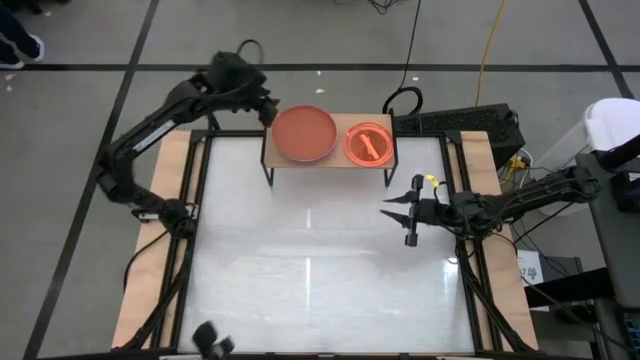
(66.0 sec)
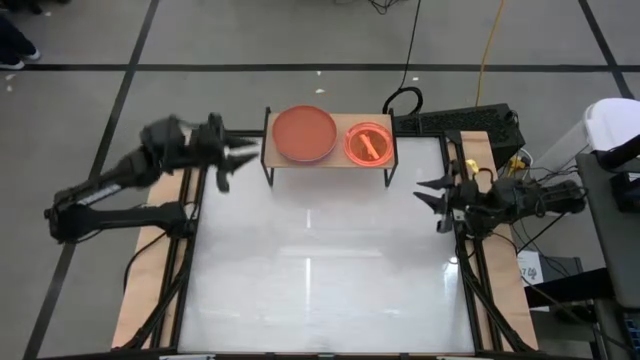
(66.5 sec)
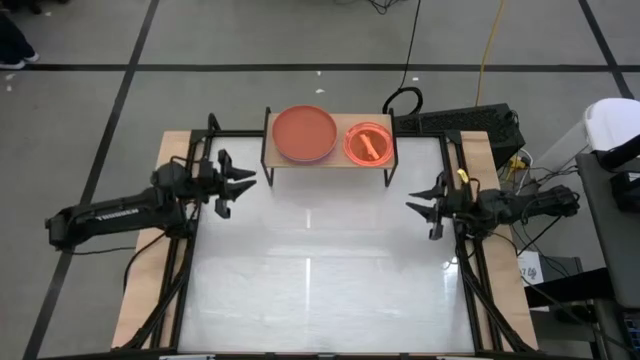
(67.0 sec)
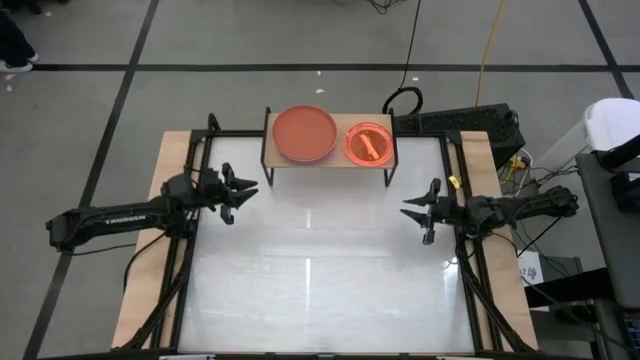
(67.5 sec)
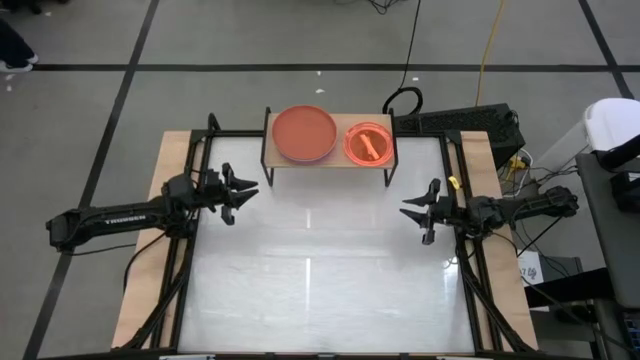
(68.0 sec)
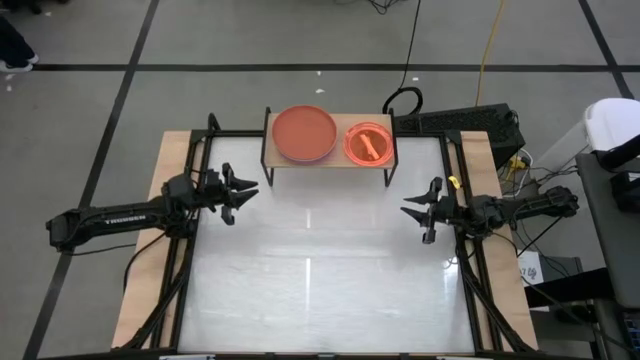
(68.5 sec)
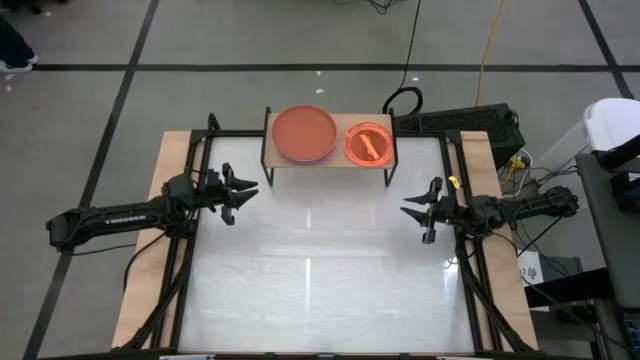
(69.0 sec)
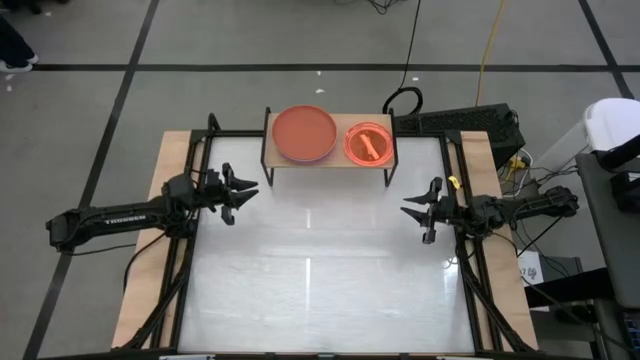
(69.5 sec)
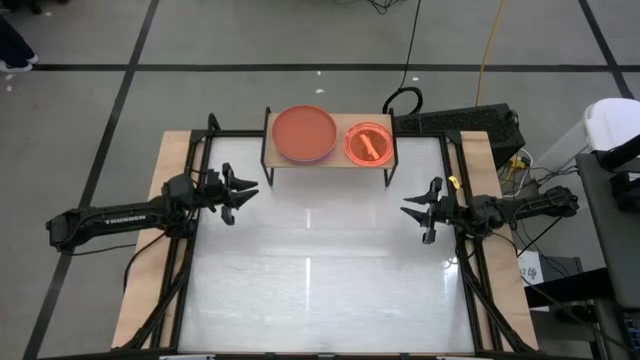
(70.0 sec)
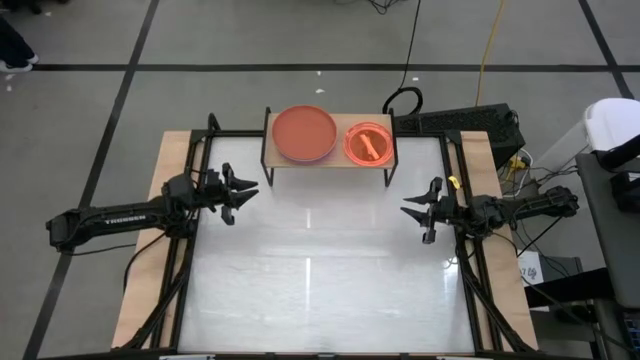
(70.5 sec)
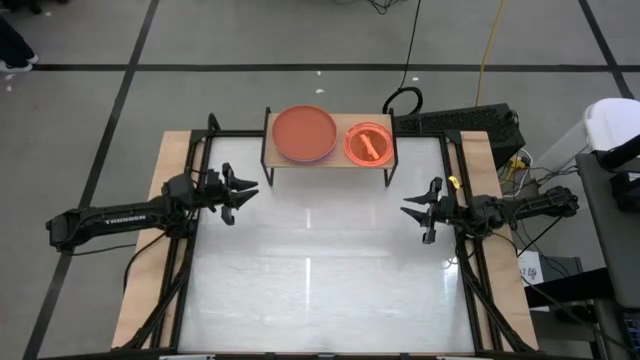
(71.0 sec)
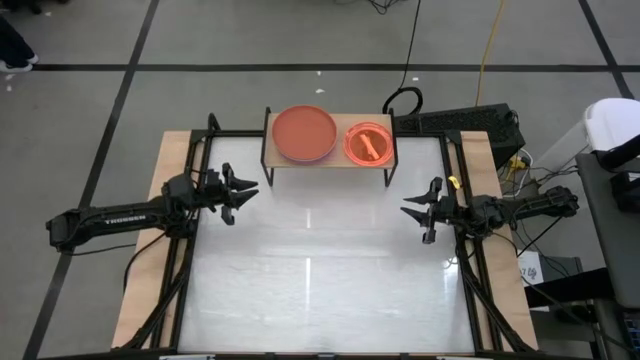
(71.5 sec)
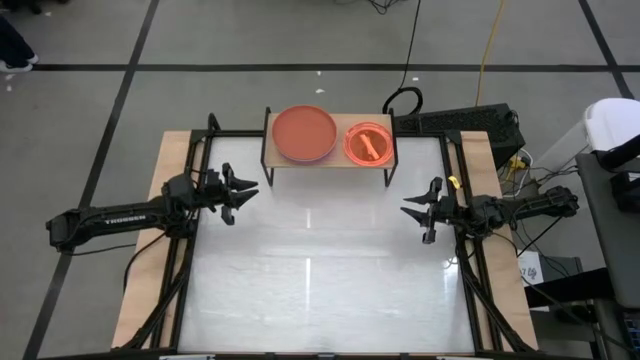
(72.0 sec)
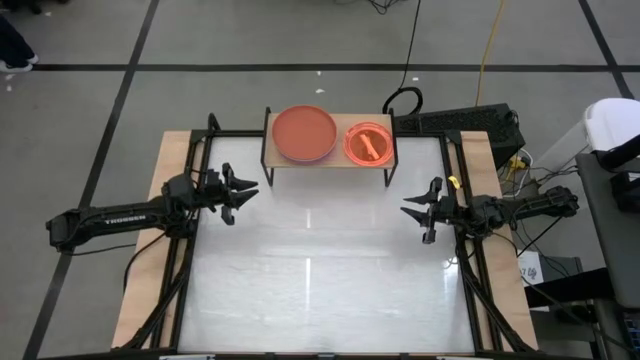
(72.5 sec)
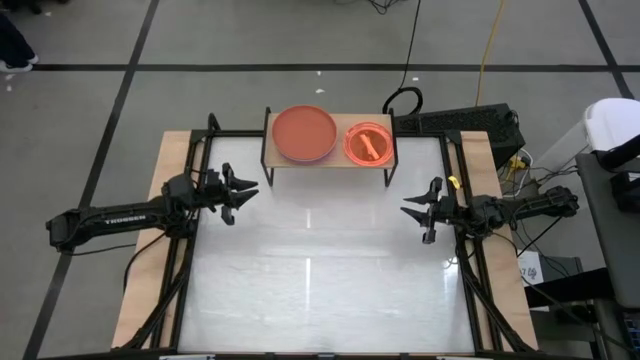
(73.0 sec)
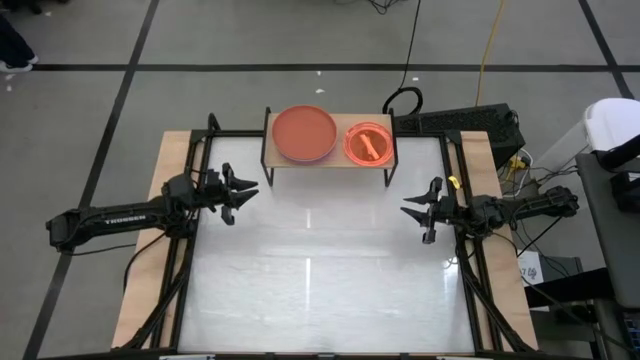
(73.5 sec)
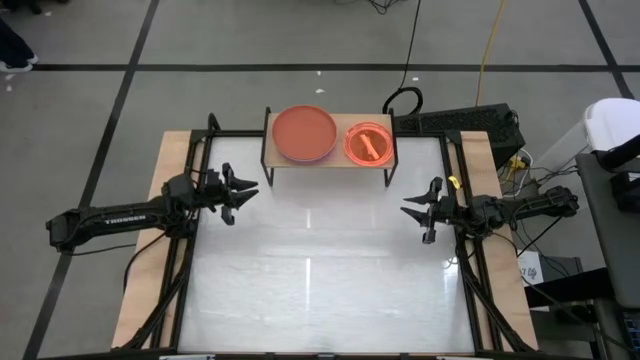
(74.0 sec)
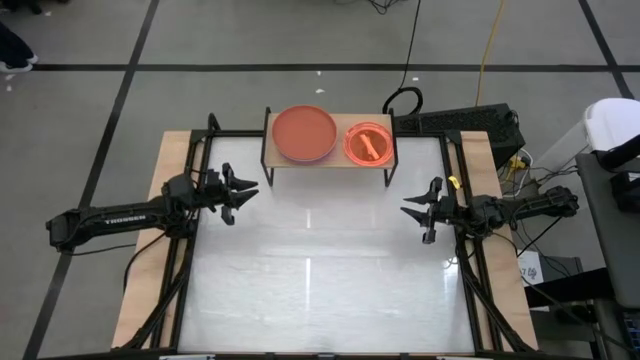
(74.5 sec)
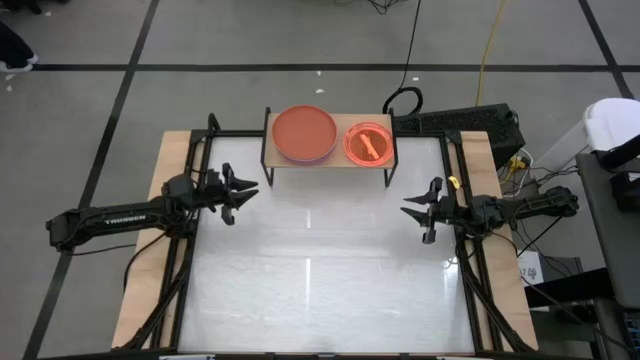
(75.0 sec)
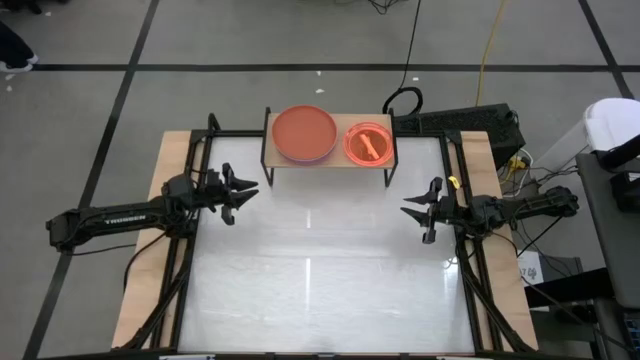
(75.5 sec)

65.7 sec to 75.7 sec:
Task: Place and stack plates onto a shelf
Return to Home Position

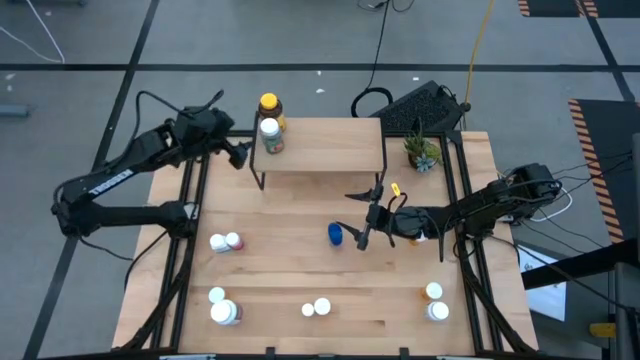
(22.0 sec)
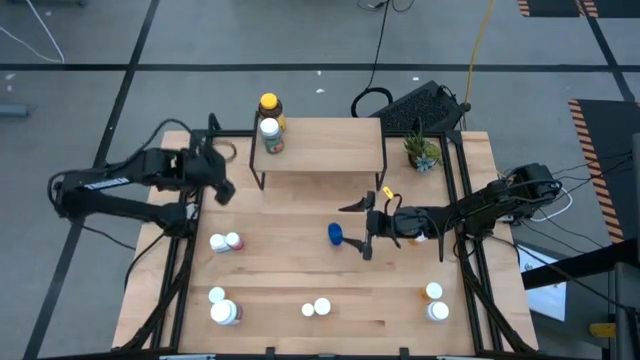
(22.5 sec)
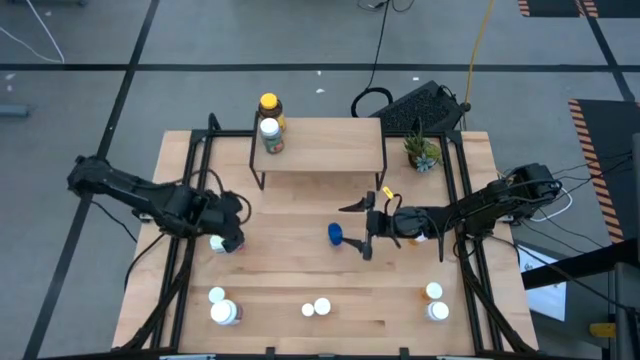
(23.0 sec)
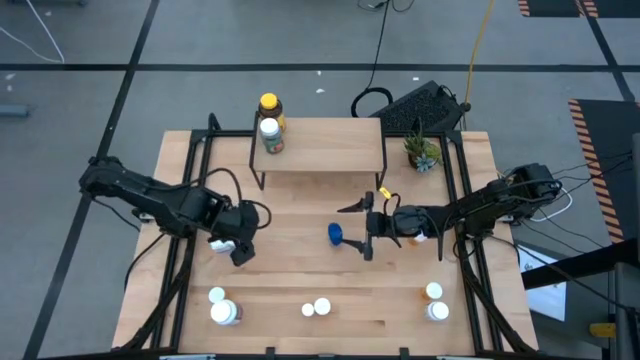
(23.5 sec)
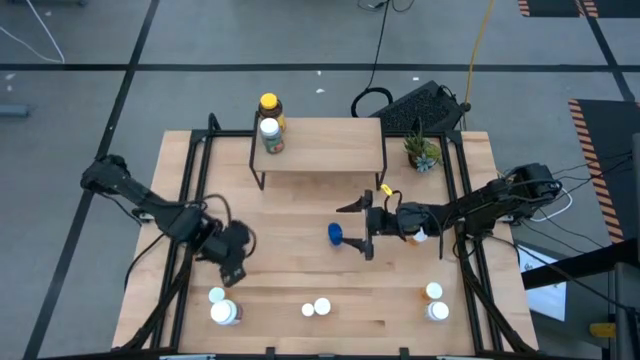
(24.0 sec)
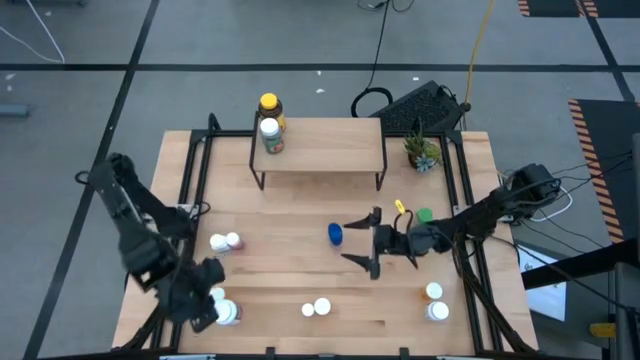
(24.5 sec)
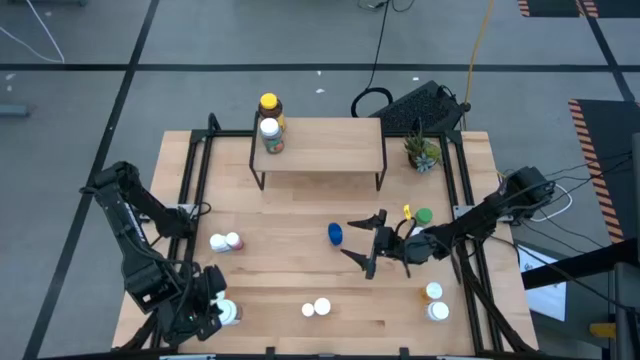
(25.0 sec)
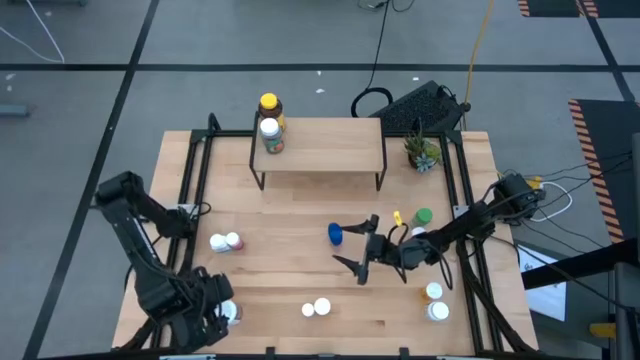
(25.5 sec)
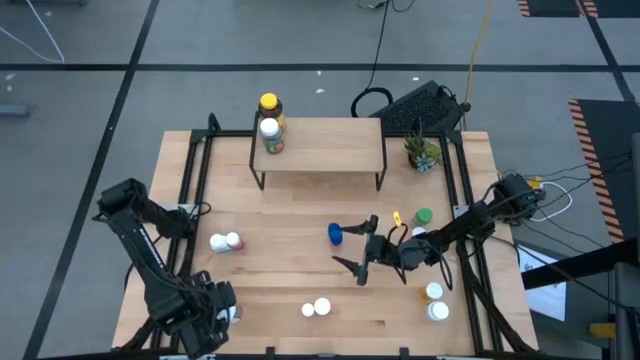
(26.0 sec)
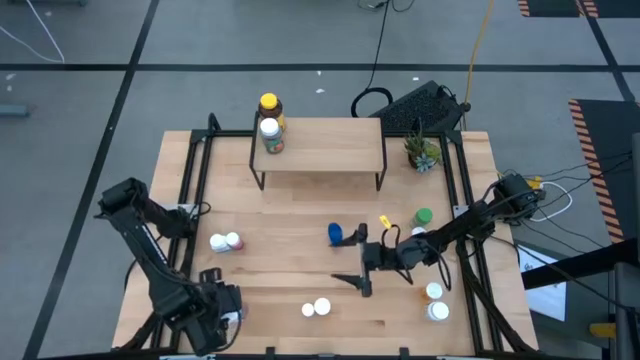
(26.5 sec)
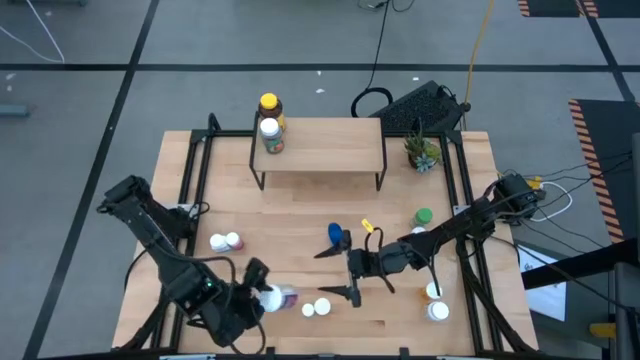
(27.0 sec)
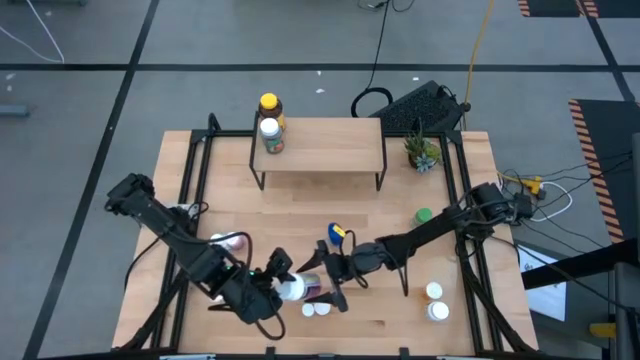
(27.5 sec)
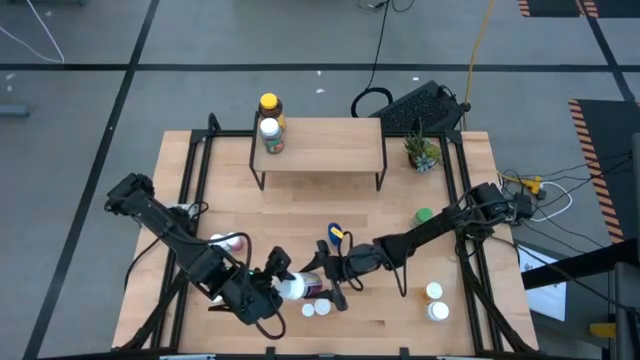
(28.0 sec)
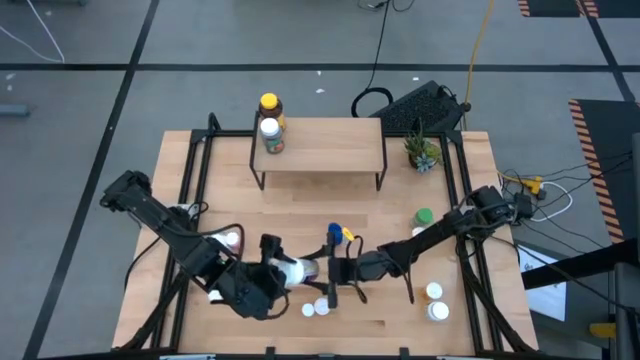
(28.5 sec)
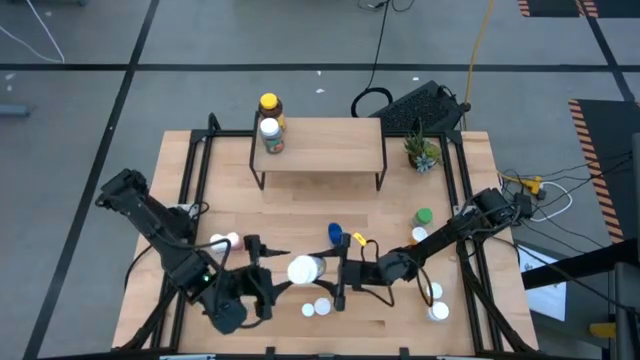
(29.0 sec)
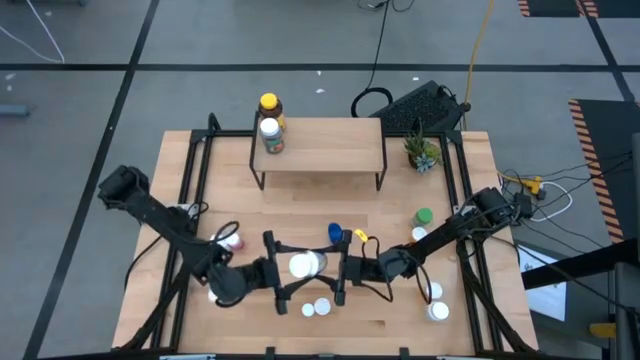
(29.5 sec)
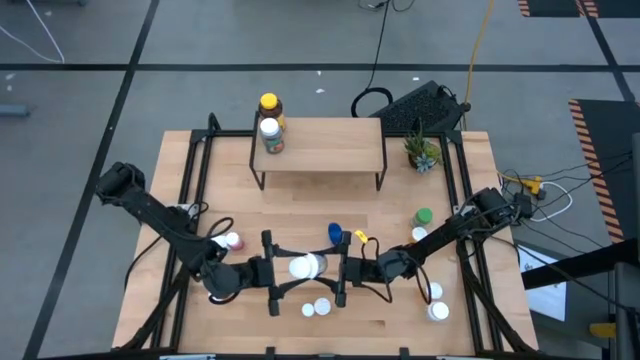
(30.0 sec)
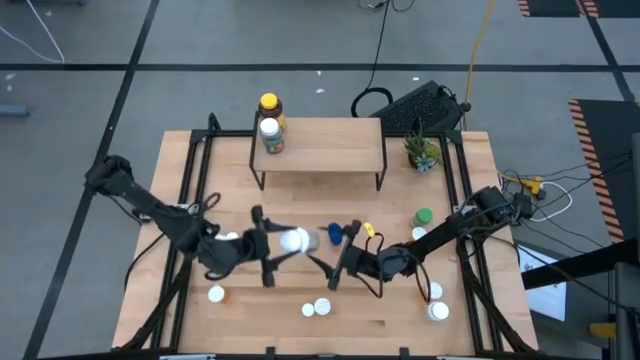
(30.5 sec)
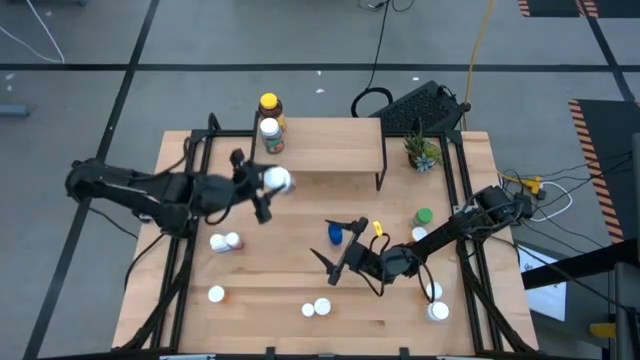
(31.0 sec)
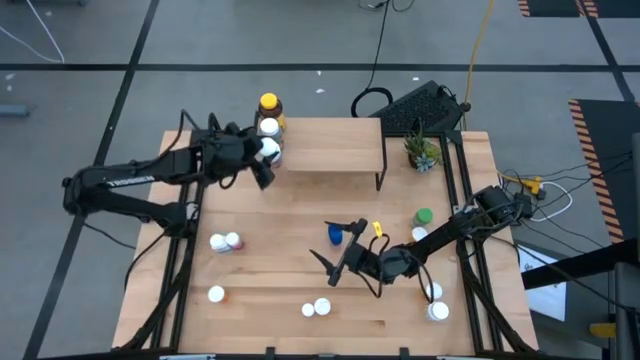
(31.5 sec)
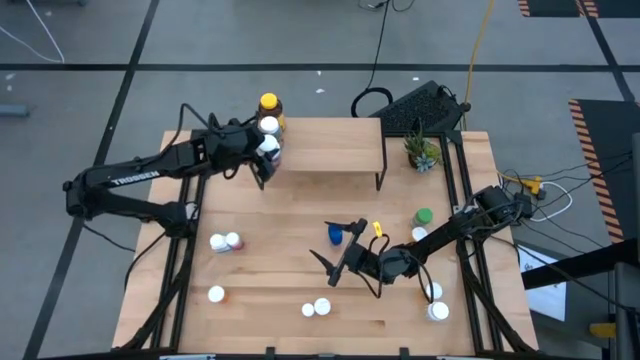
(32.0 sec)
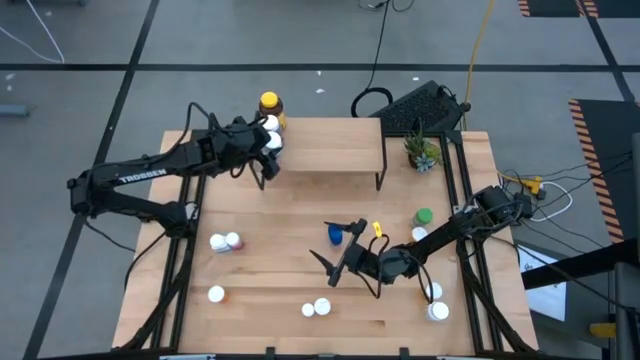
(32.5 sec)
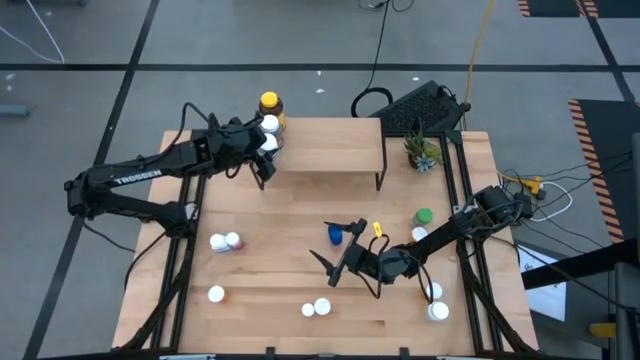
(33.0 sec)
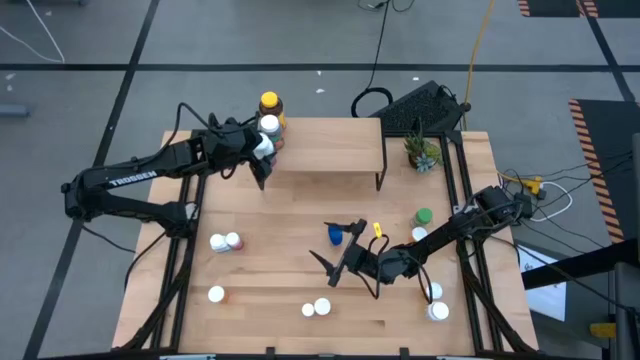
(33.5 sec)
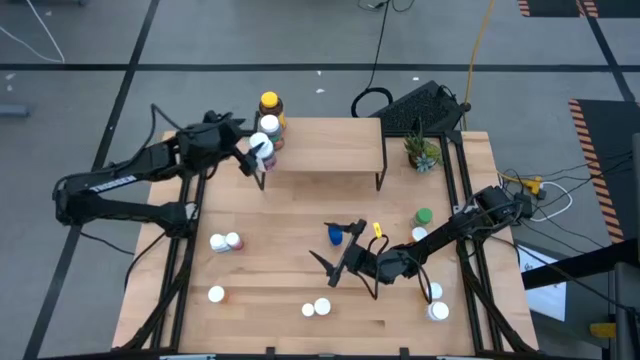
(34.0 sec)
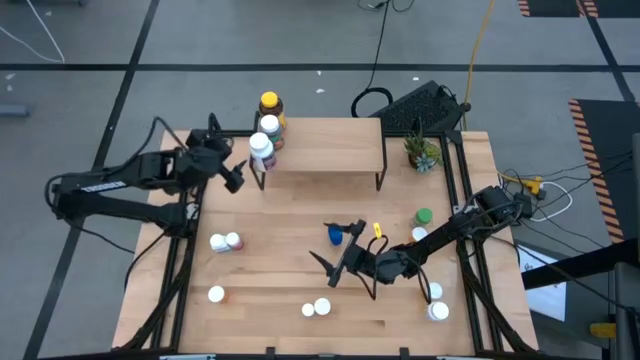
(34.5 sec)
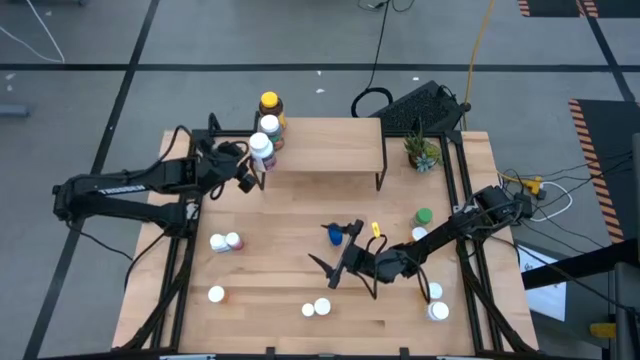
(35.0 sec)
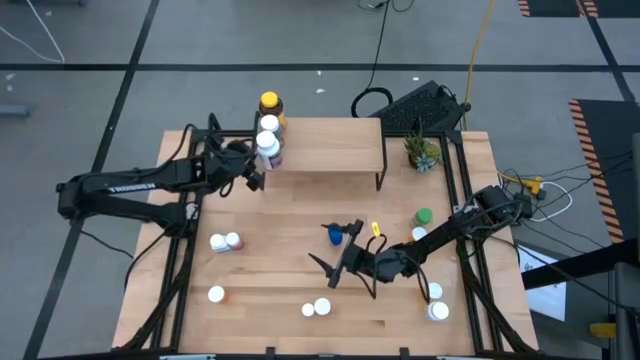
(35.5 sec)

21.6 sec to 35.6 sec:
Task: Pick and place medicine bottles onto shelf by color
Put the large white medicine bottle on the shelf, aligned with the other large yellow and green medicine bottles
